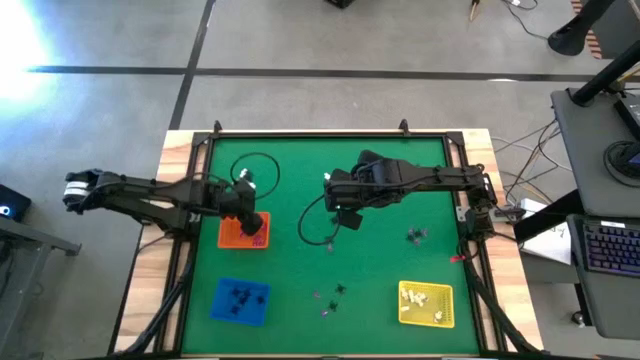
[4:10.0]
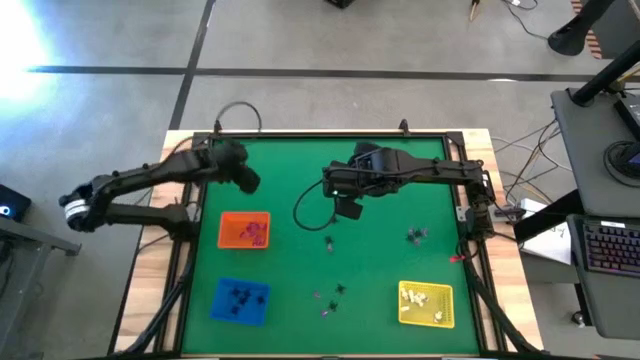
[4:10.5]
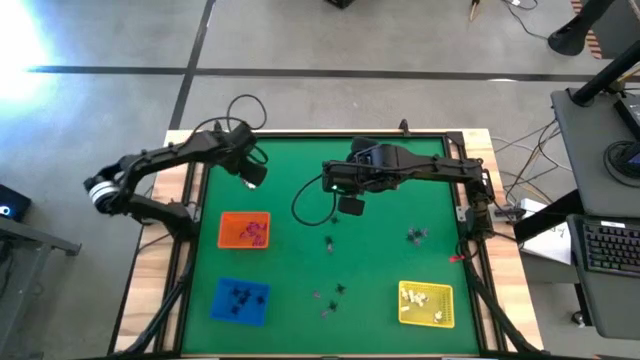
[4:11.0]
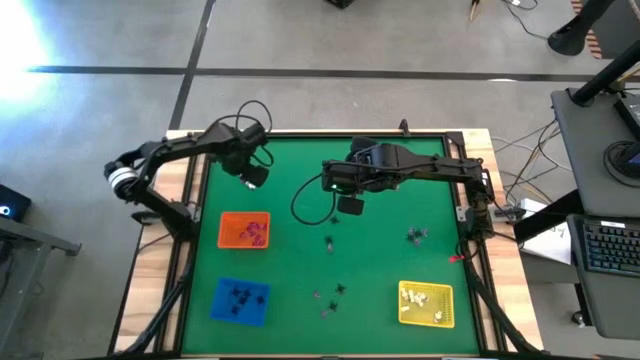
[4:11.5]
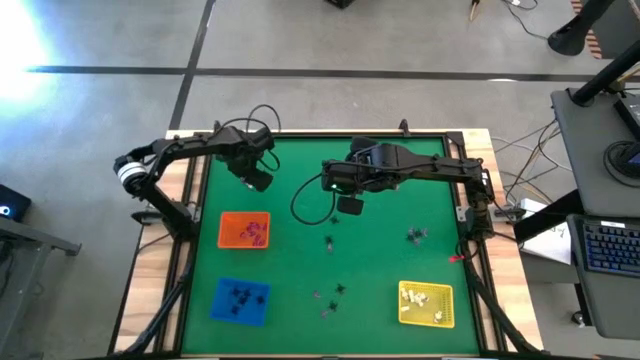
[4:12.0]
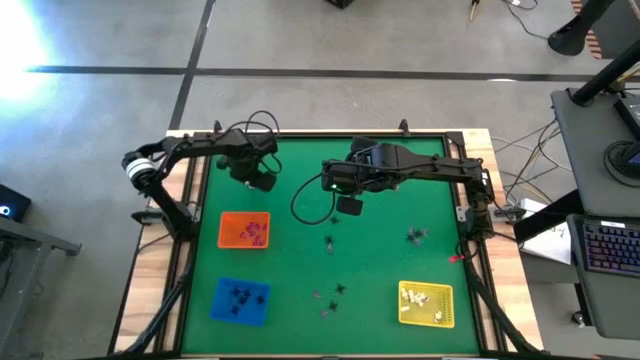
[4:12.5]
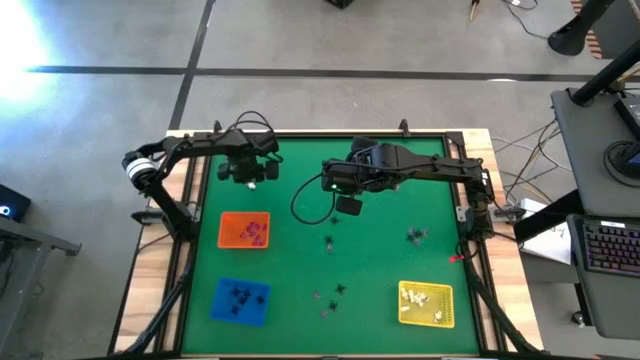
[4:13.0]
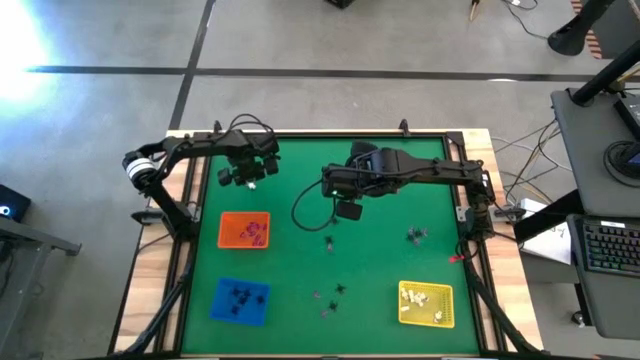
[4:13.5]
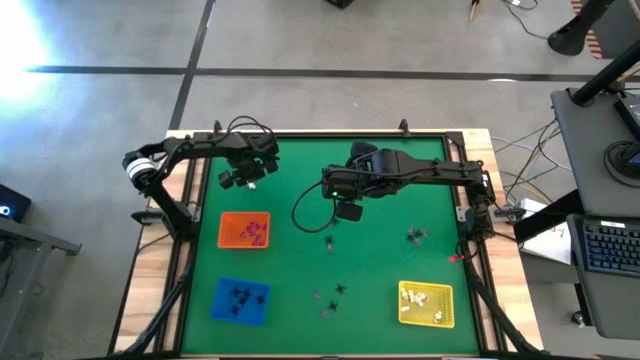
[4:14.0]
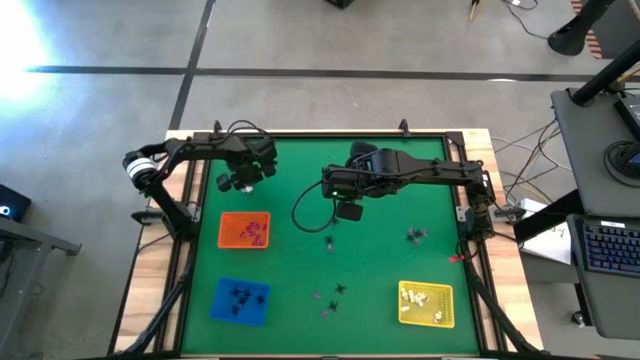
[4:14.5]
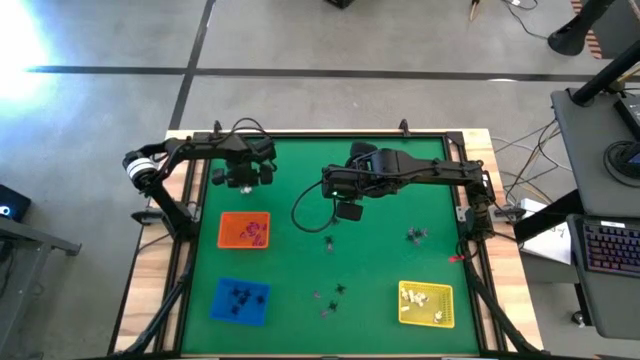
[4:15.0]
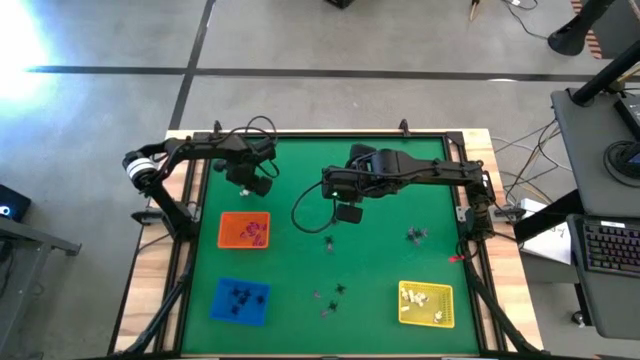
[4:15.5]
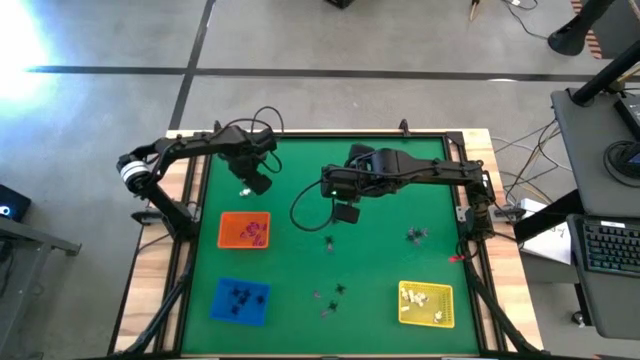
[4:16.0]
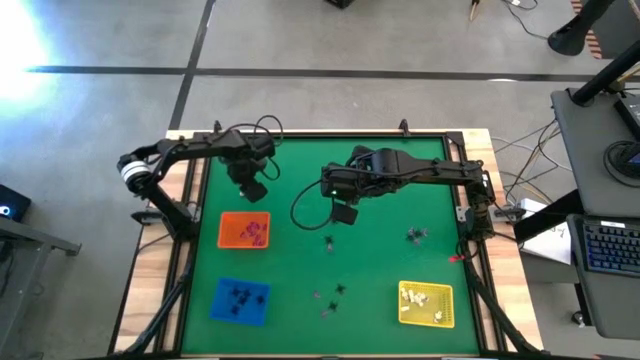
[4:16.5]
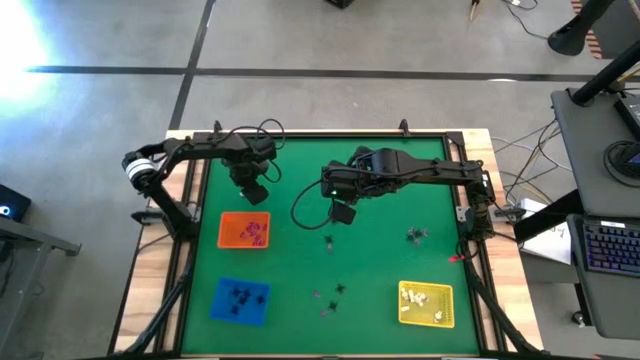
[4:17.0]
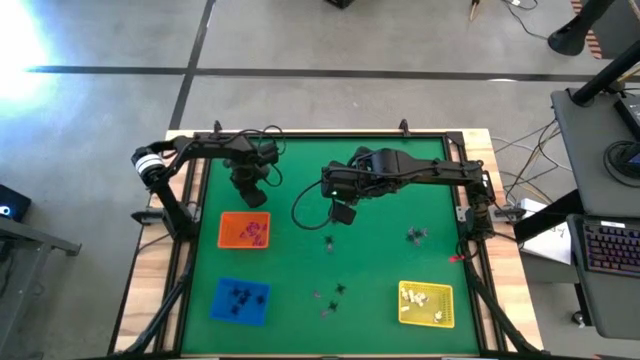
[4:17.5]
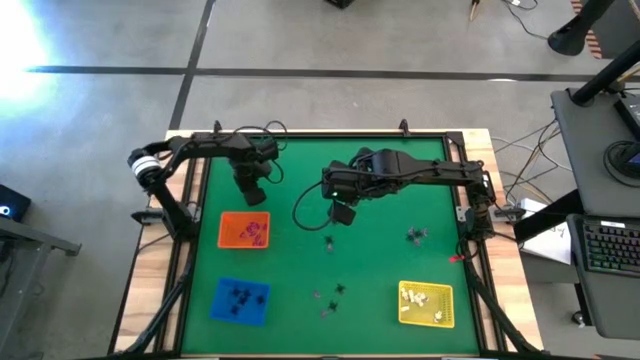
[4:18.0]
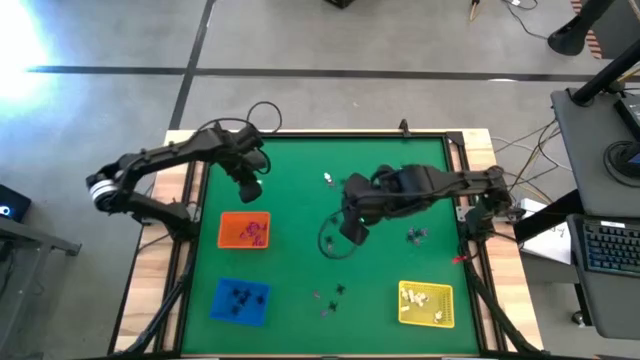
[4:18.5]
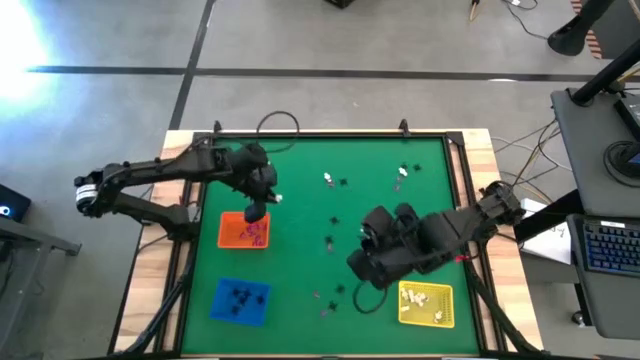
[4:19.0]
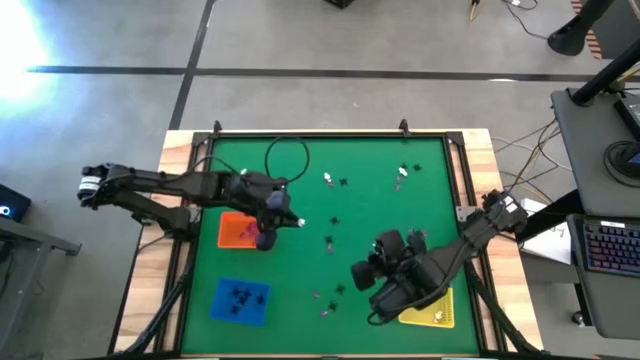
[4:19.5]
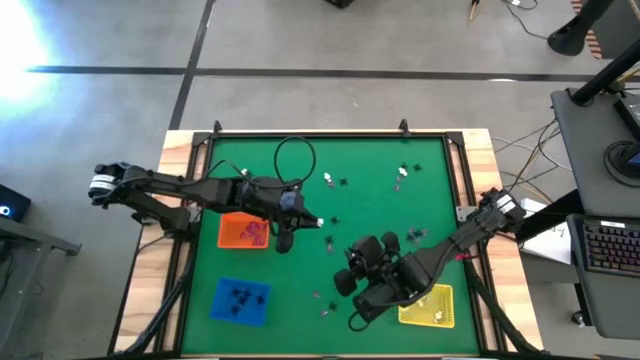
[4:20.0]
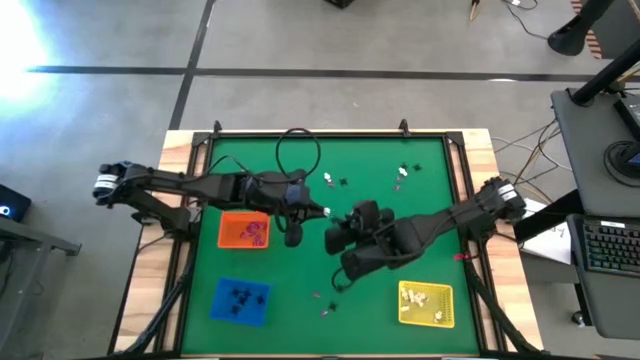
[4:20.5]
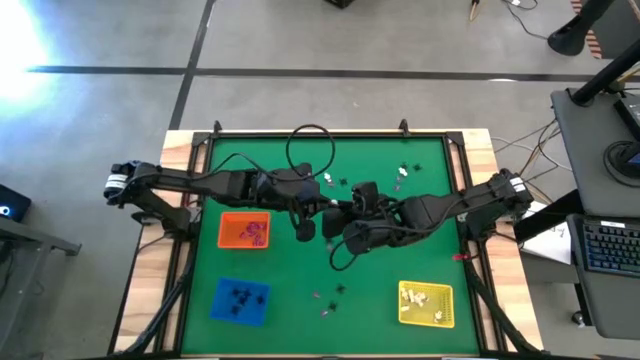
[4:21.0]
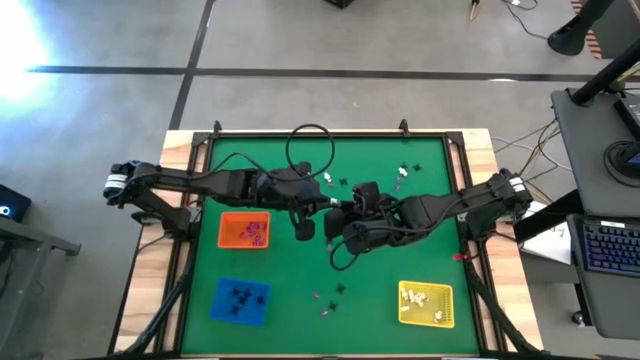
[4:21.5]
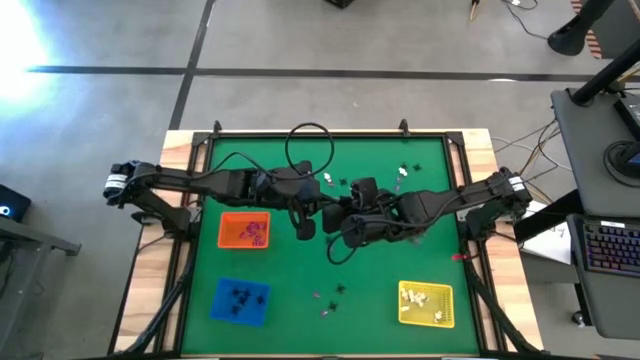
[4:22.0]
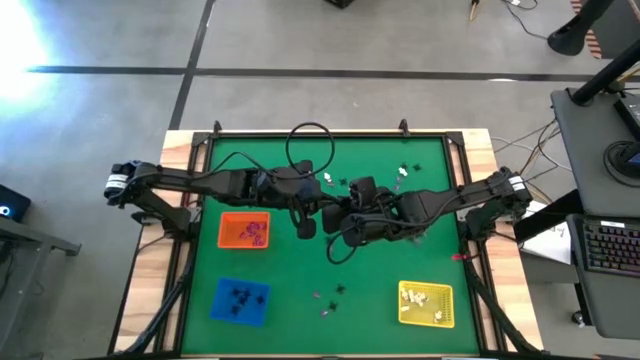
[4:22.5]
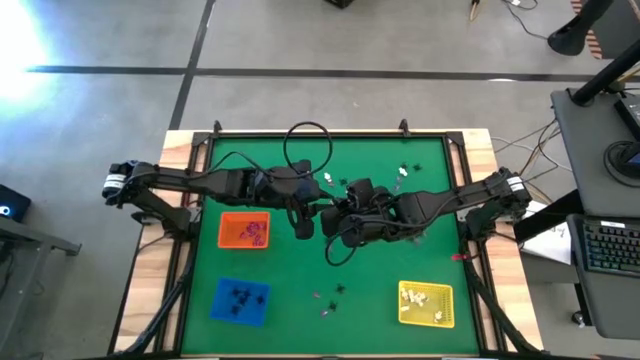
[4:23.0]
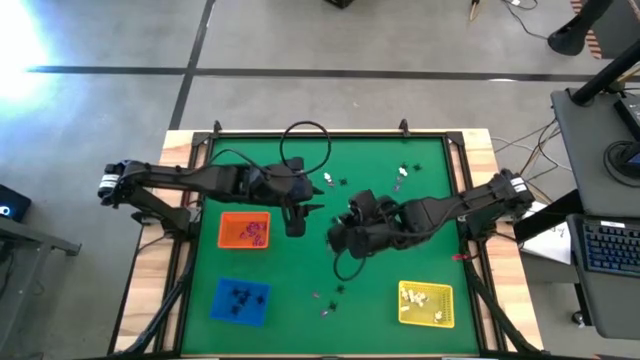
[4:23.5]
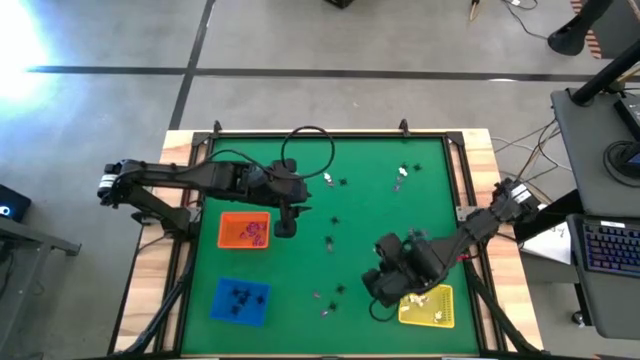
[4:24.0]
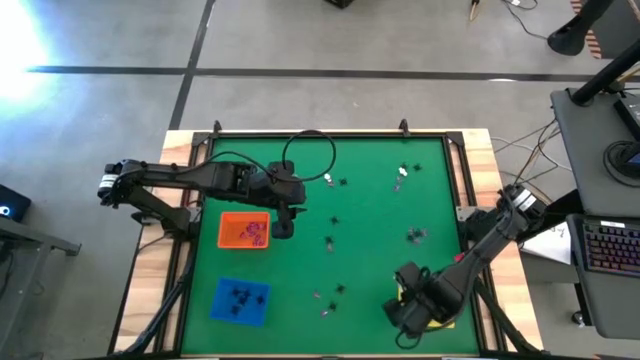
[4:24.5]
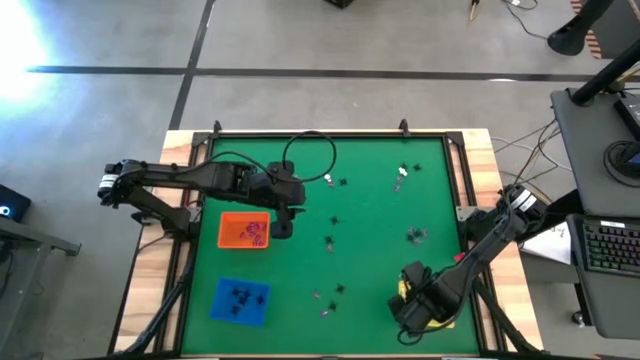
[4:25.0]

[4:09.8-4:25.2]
Task: Sort Halloween decoration
Put the white skeleton toy into the yellow bin

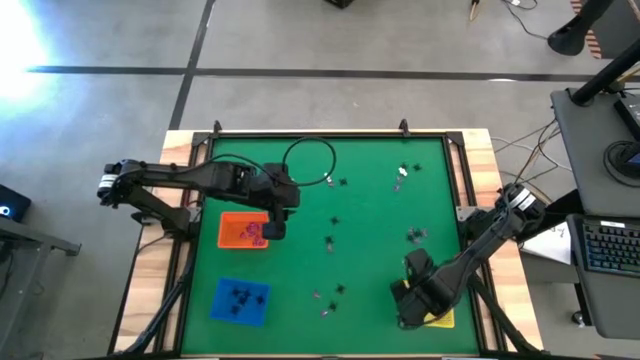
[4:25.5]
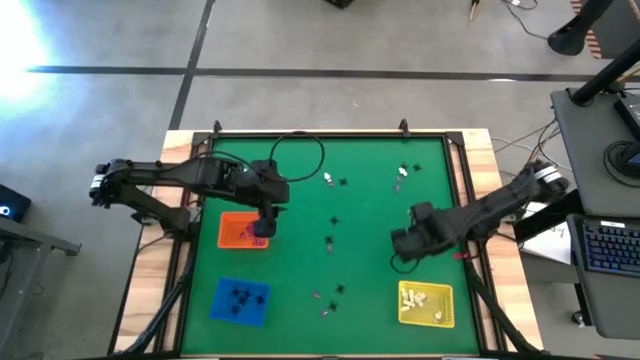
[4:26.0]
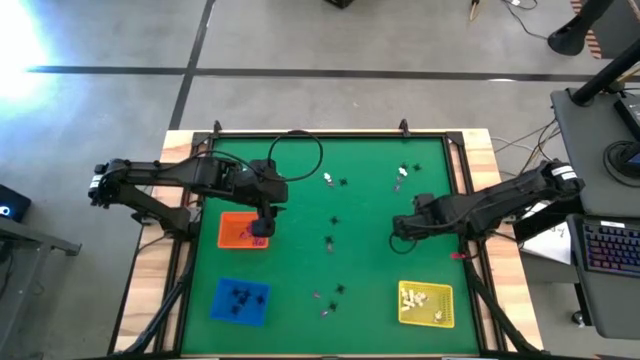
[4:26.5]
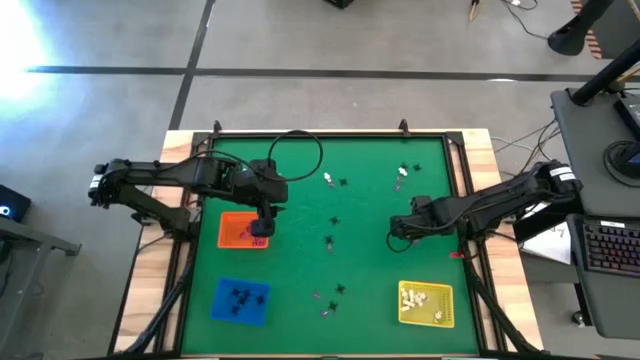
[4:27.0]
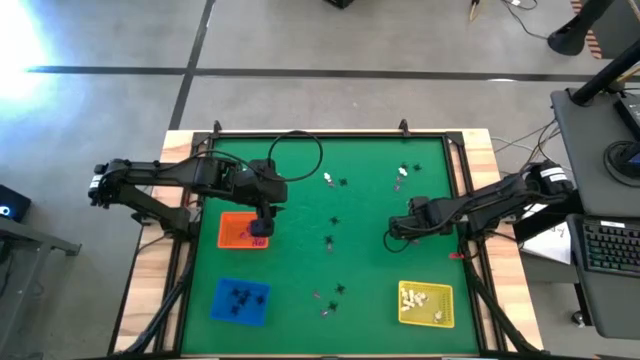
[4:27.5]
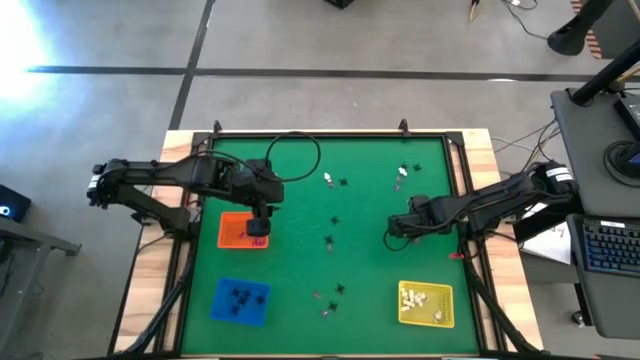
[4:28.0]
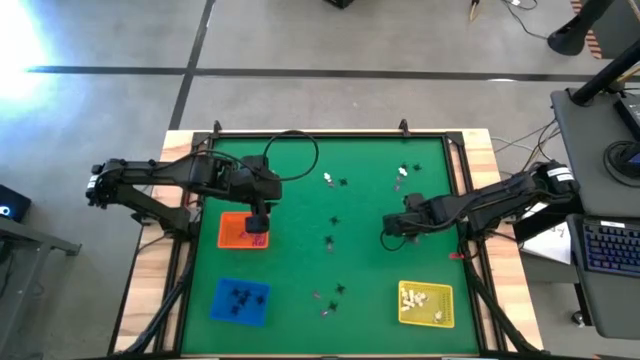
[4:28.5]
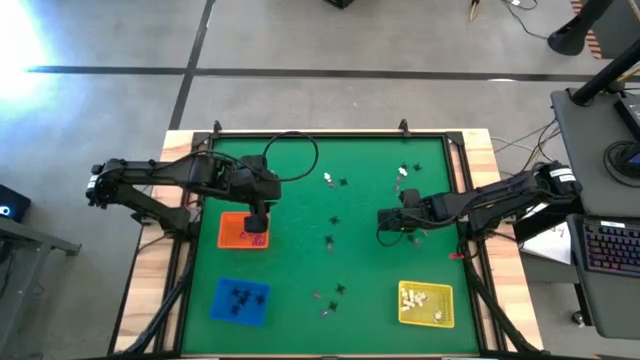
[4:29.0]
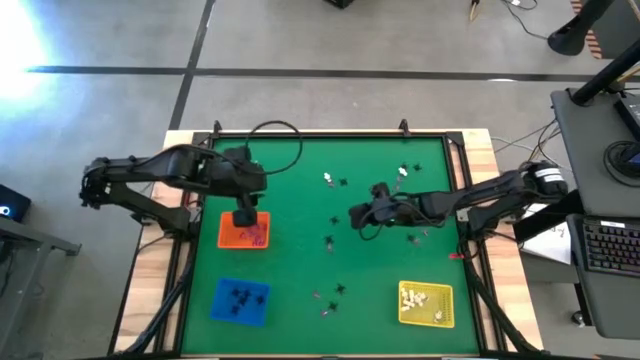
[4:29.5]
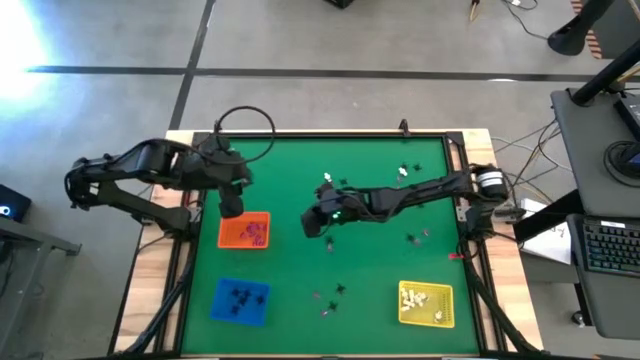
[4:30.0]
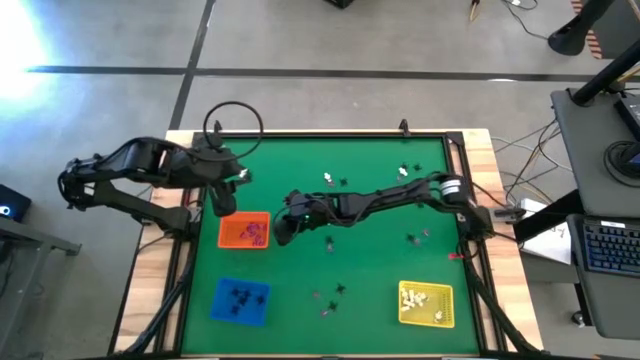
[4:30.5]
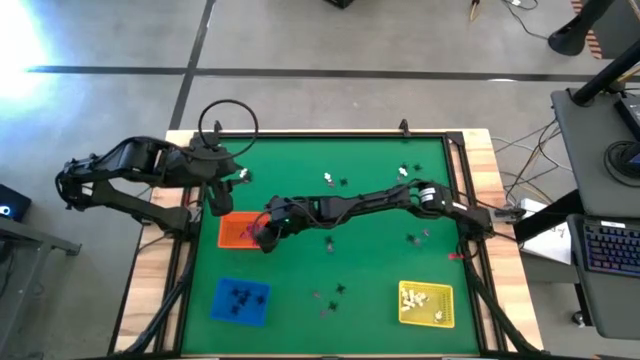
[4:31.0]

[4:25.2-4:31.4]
Put the violet witch hat toy into the orange bin
